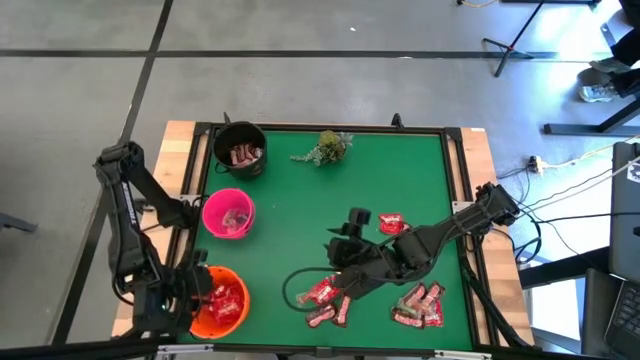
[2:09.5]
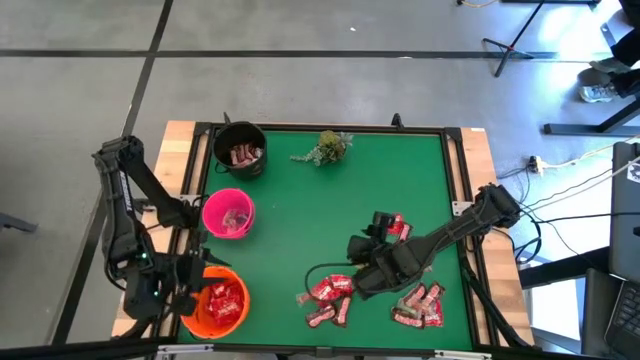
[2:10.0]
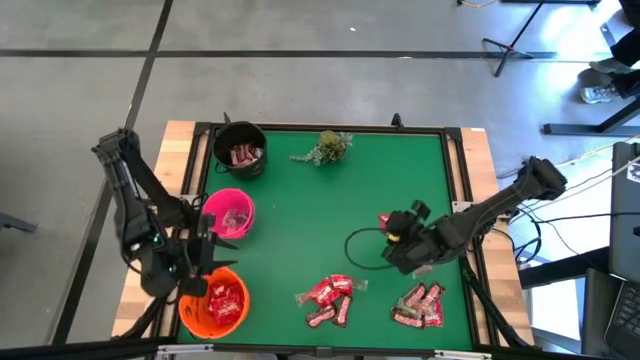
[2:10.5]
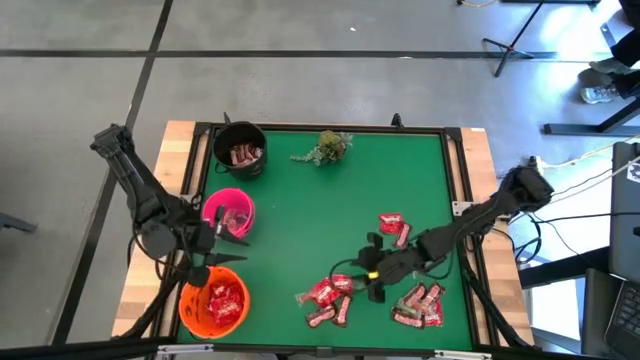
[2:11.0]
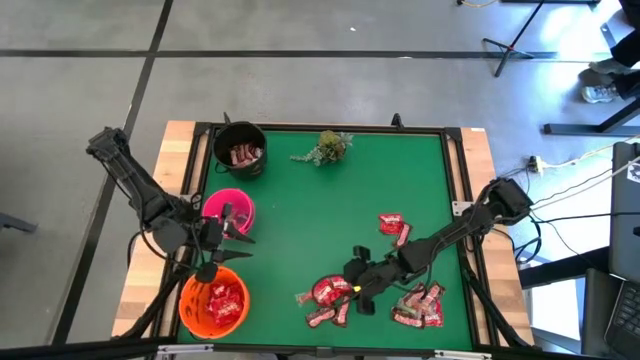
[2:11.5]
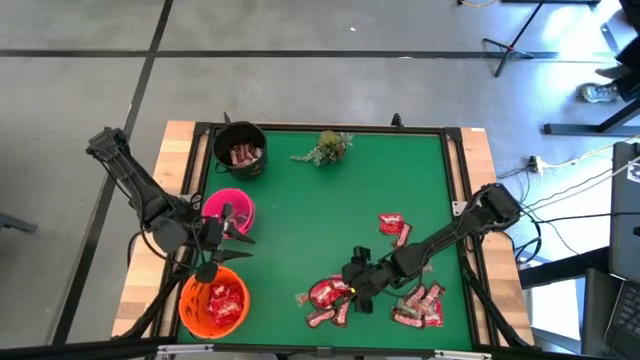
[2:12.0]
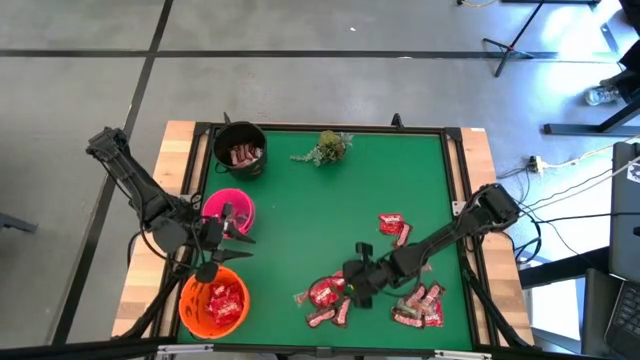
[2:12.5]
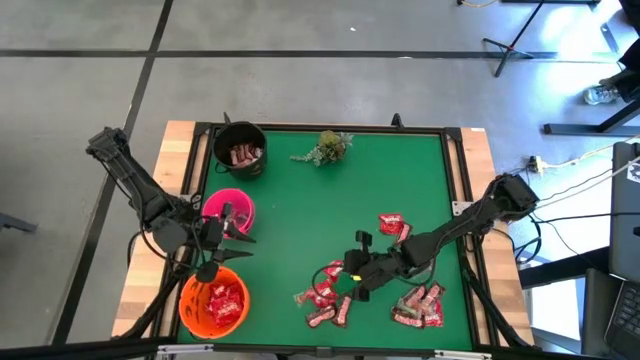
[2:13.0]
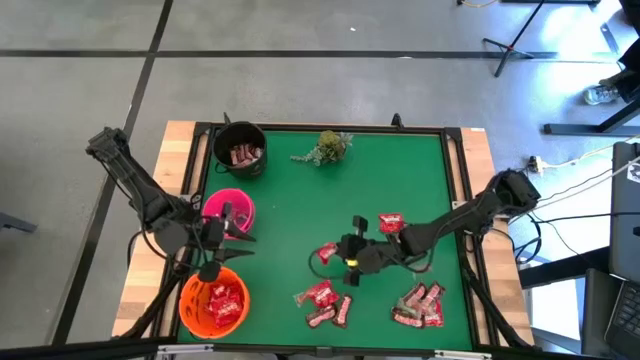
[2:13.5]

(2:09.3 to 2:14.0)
Task: Sort candy
Put the red candy into the orange bucket

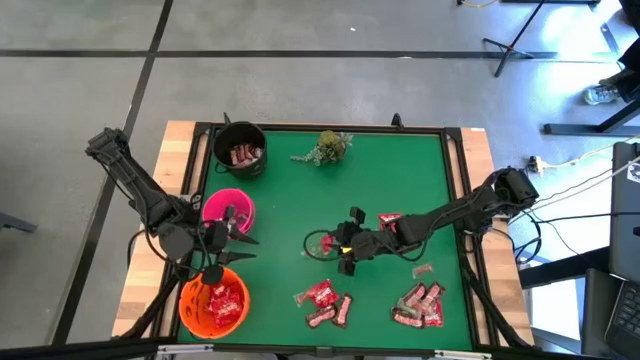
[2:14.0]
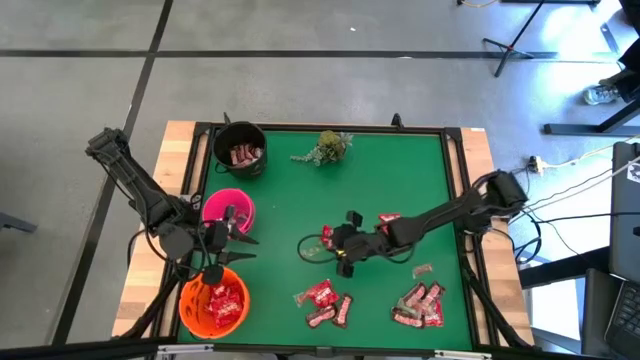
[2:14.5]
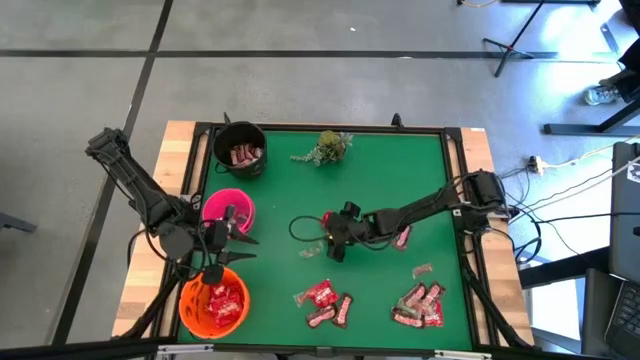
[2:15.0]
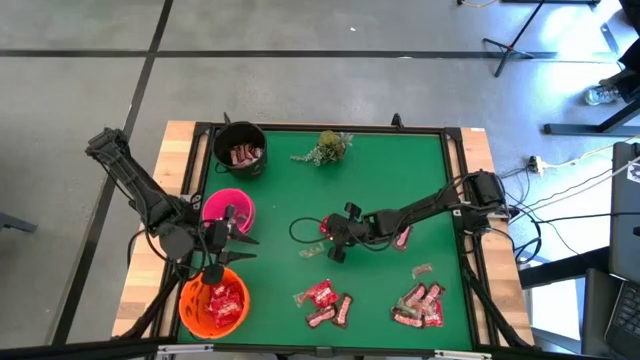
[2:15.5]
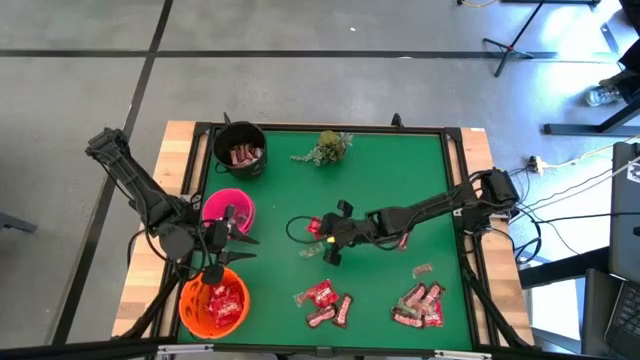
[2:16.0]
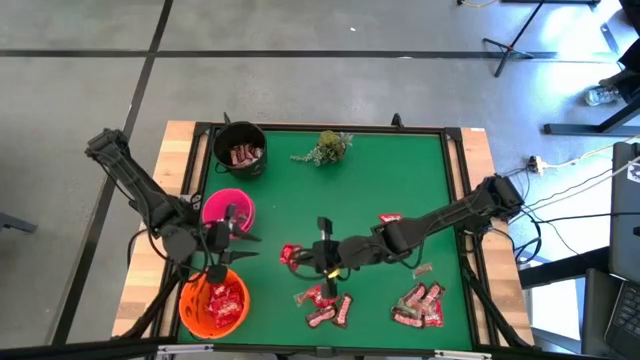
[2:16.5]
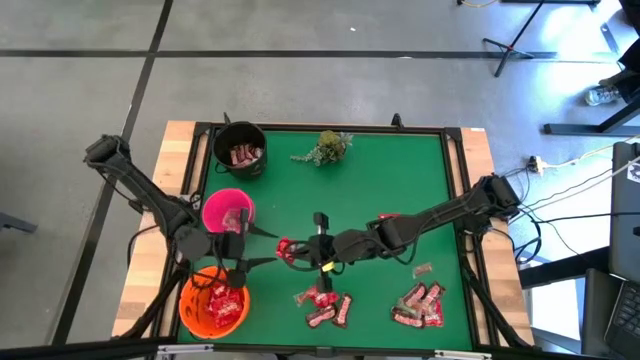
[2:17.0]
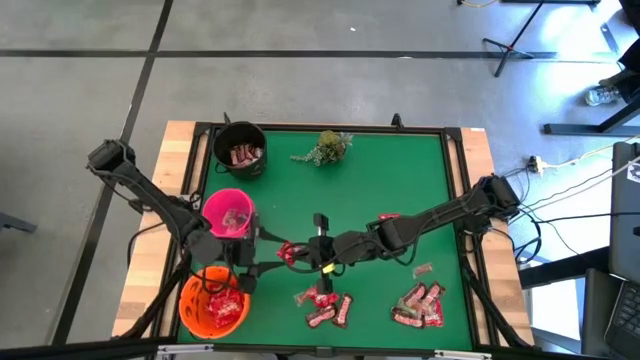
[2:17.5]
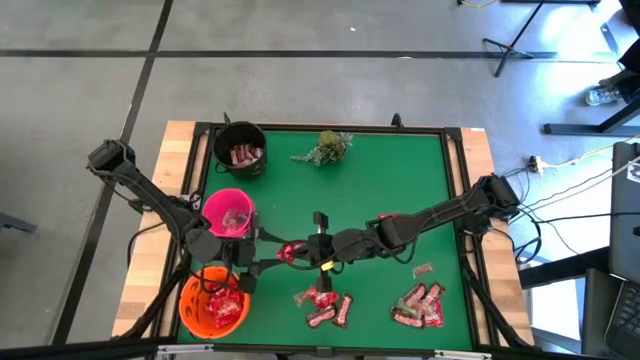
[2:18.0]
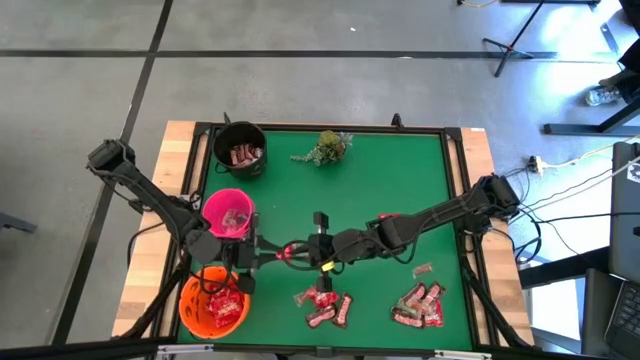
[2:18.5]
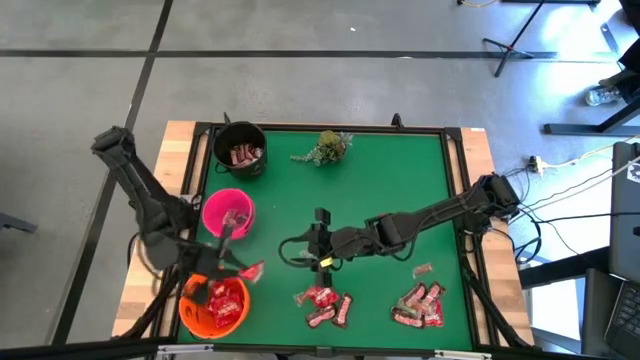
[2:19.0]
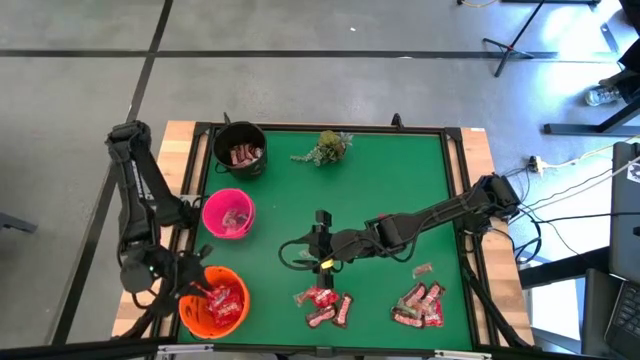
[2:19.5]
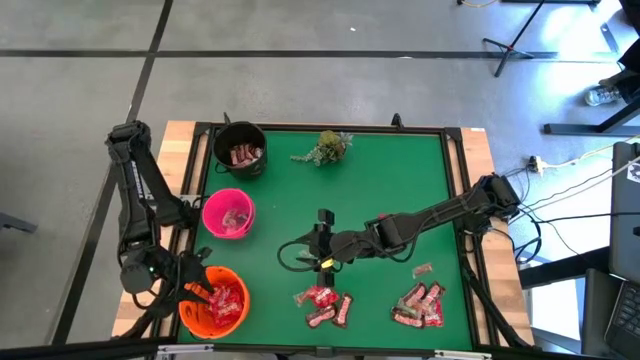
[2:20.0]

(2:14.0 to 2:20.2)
Put the red candy into the orange bucket

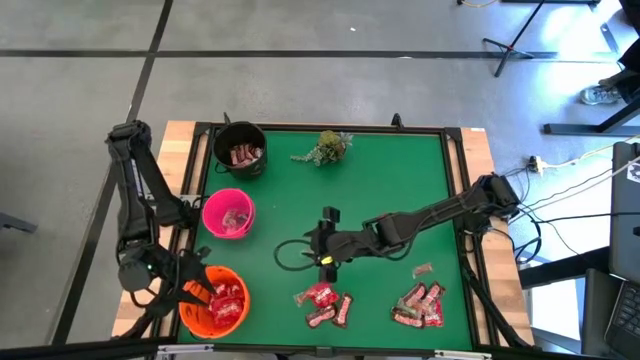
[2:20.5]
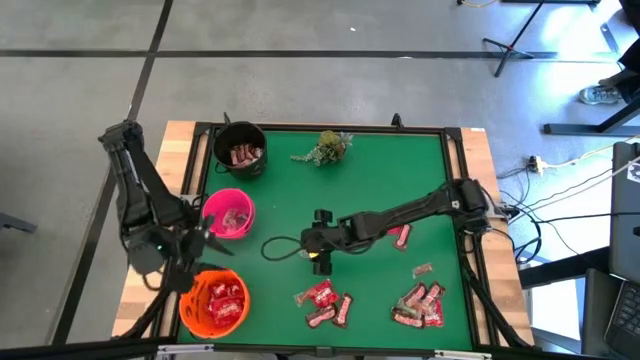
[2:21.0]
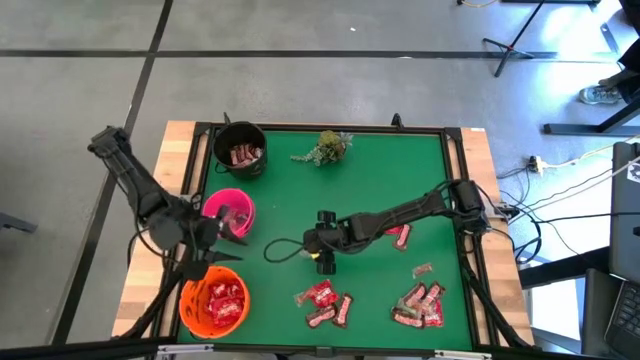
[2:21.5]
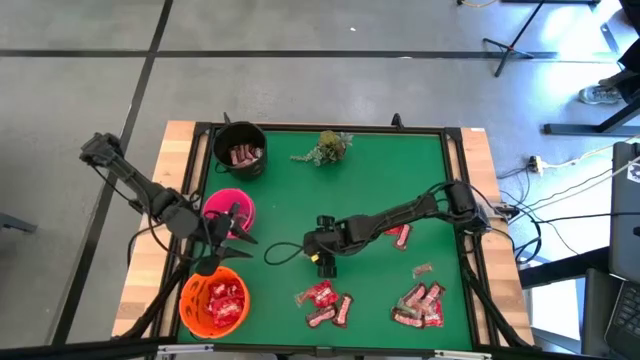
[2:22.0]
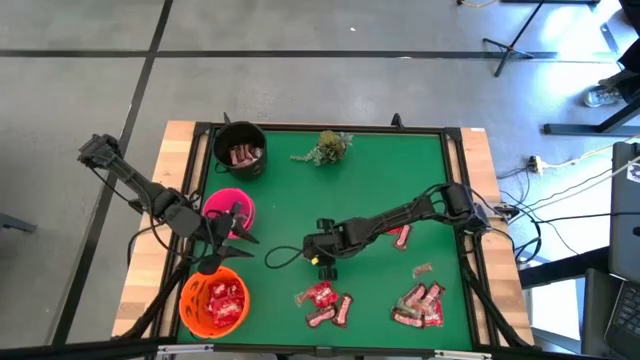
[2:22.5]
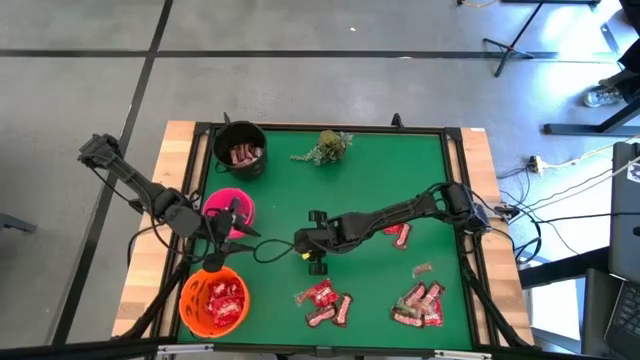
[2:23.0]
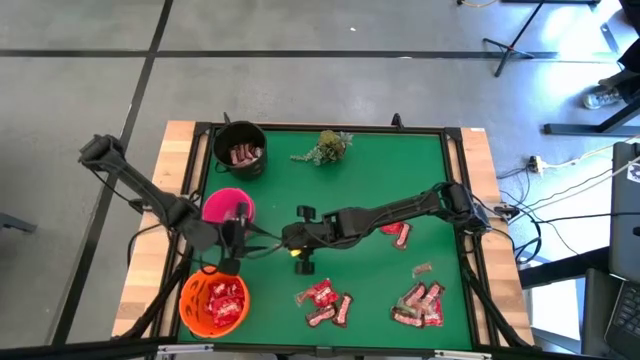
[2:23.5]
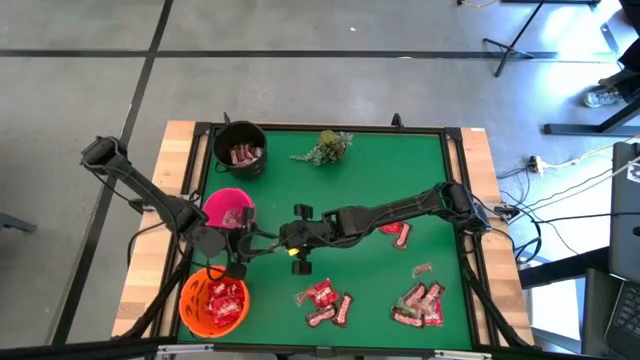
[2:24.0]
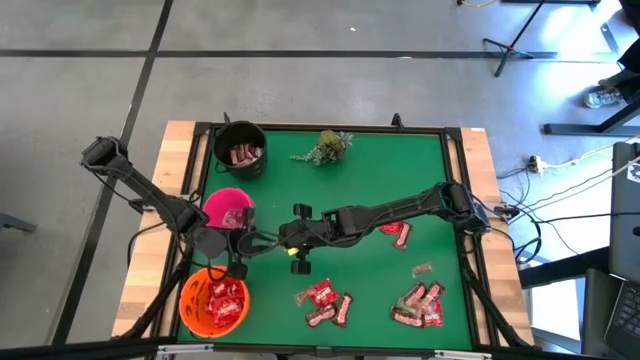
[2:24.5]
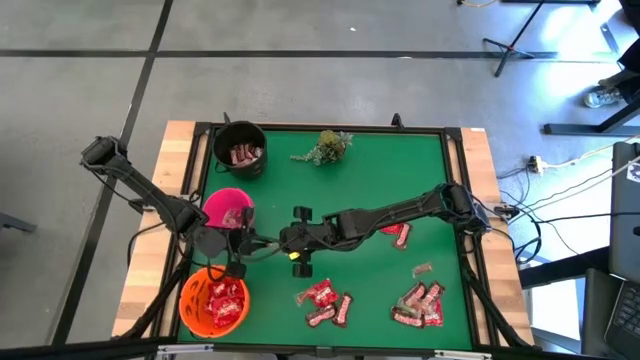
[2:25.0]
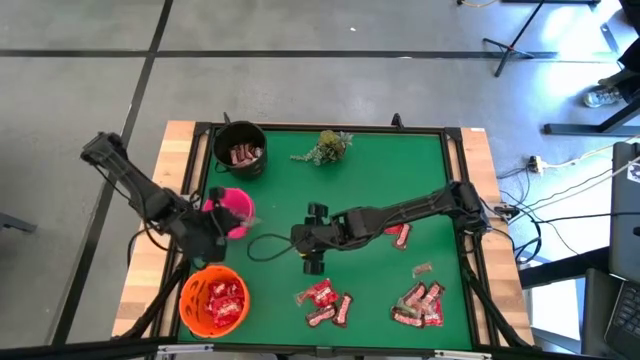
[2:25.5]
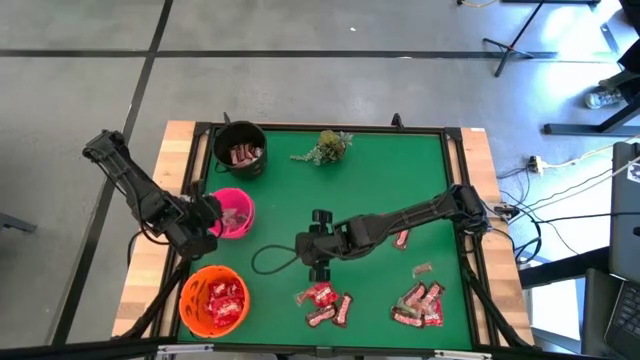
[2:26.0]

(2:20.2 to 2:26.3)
Put the green gummy into the pink bucket

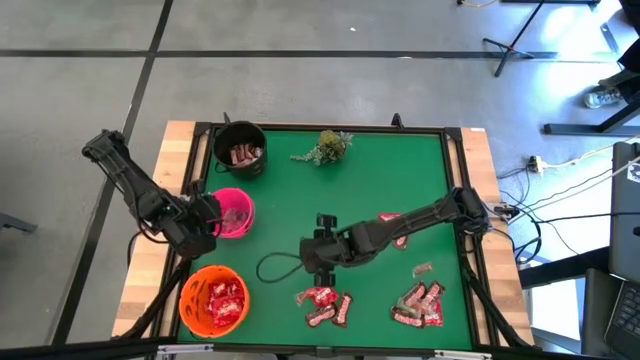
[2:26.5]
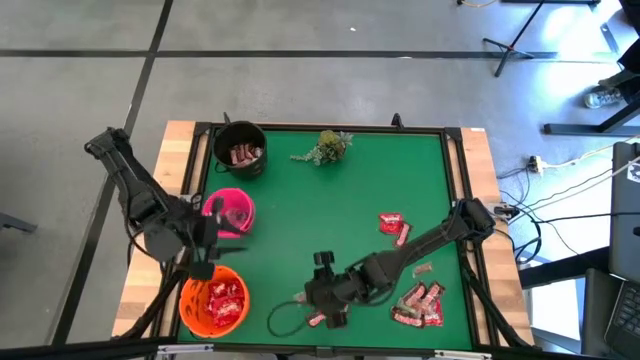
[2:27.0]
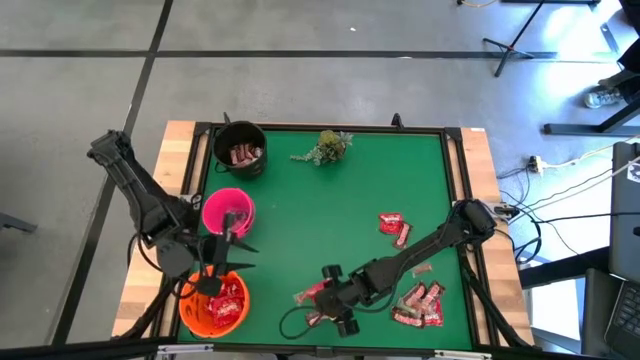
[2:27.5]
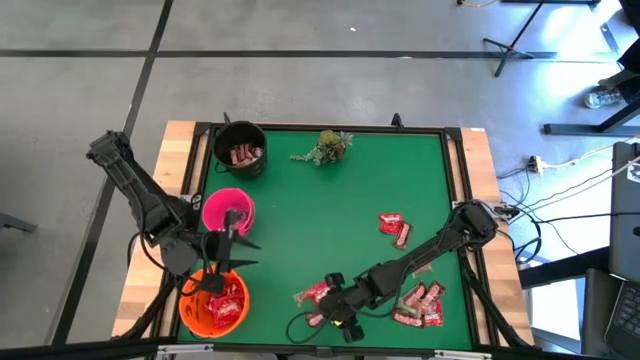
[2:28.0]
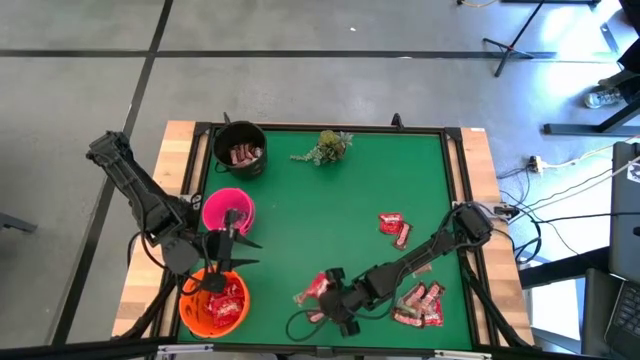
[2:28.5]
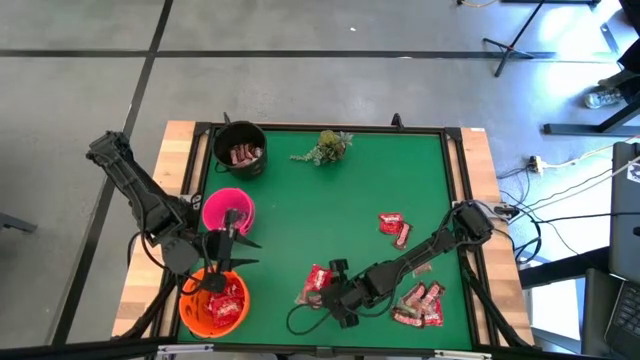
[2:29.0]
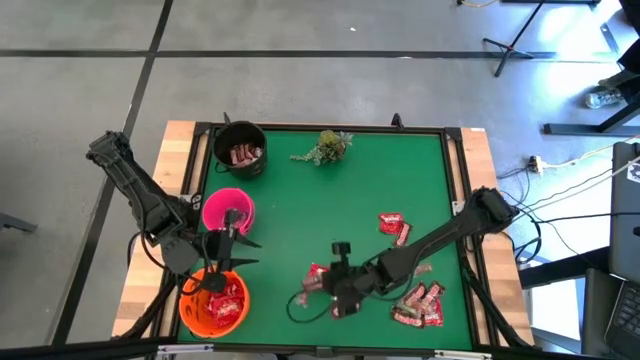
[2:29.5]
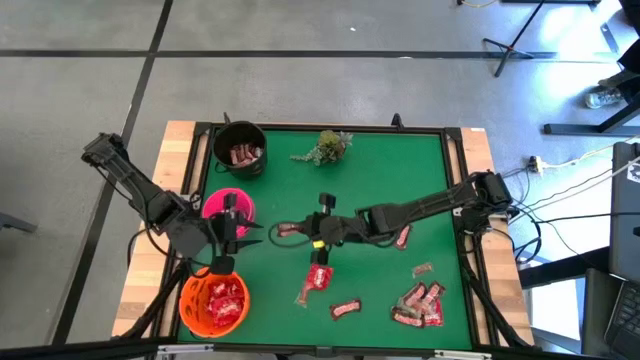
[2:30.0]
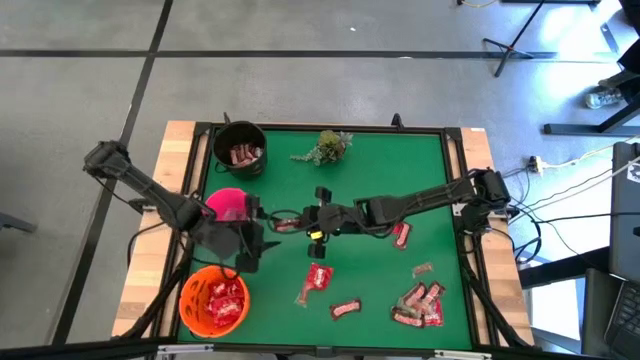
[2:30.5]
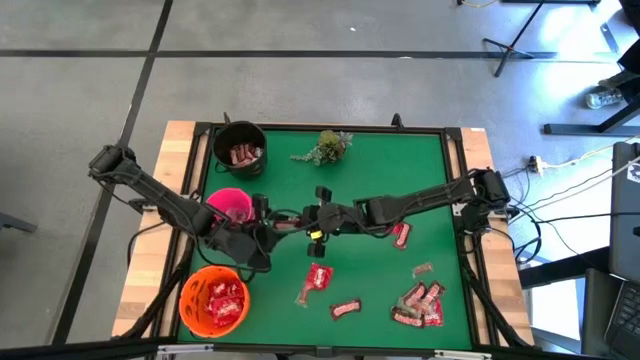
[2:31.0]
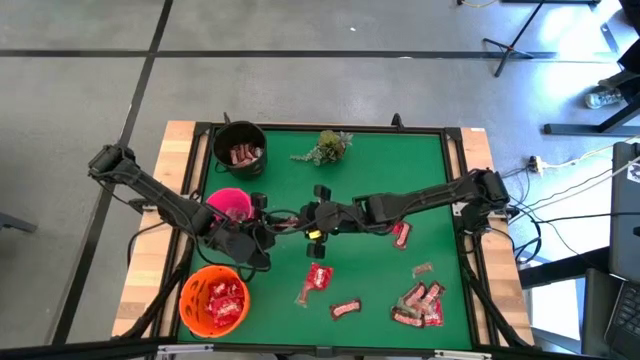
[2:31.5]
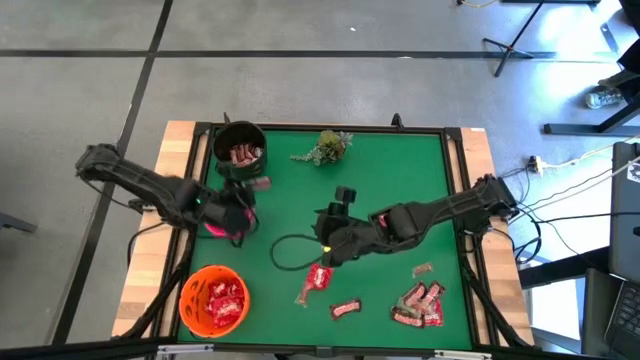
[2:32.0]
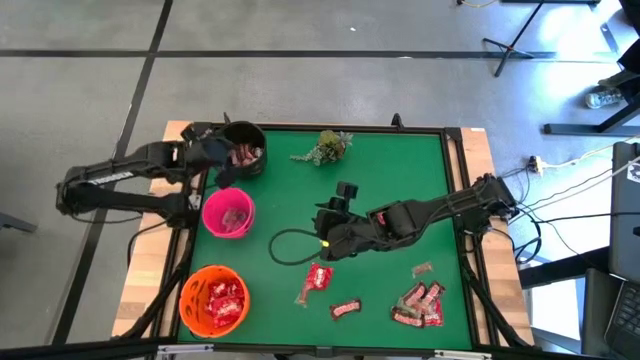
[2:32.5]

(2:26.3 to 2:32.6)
Put the brown chocolate into the black bucket
